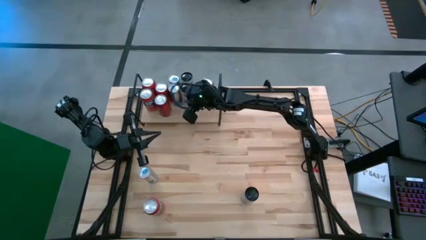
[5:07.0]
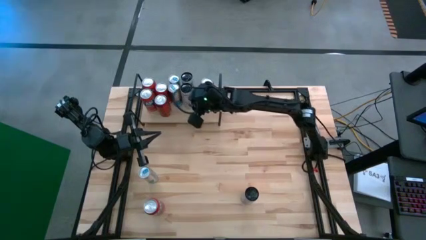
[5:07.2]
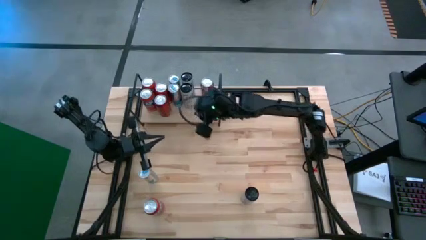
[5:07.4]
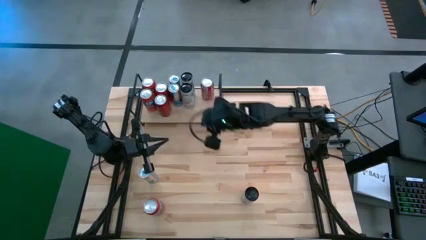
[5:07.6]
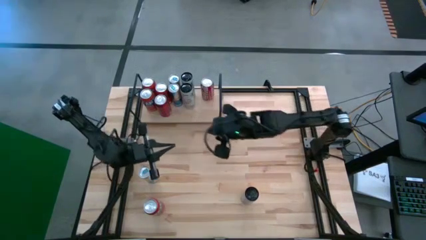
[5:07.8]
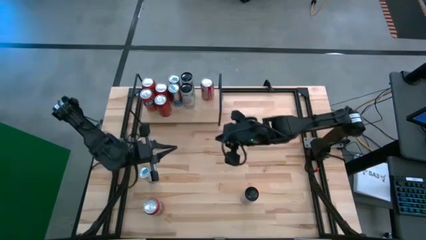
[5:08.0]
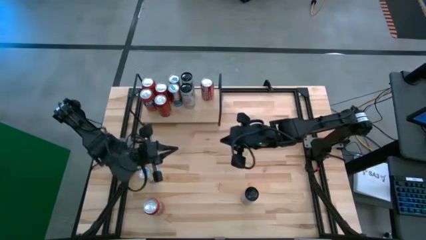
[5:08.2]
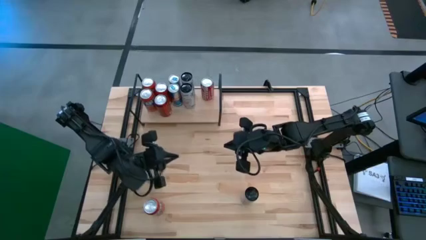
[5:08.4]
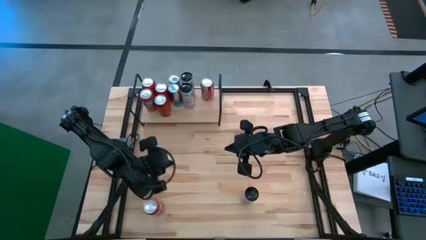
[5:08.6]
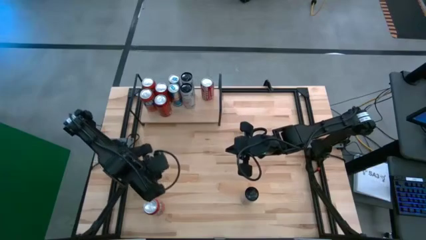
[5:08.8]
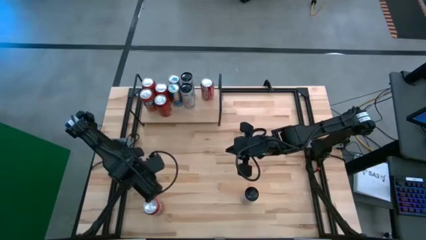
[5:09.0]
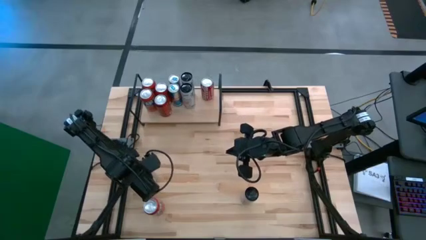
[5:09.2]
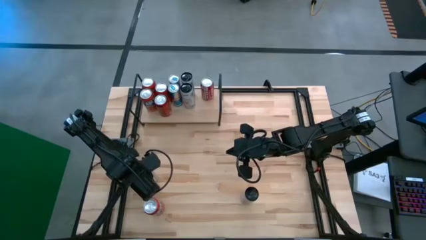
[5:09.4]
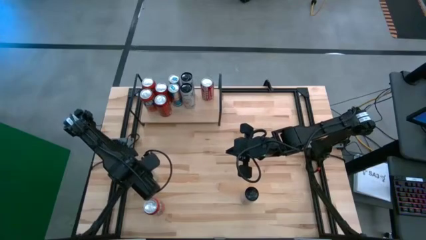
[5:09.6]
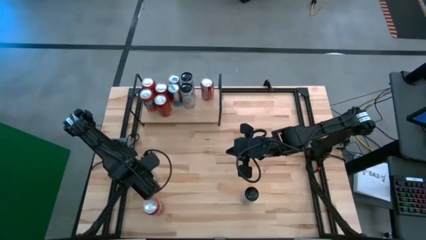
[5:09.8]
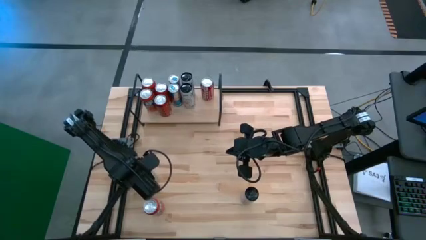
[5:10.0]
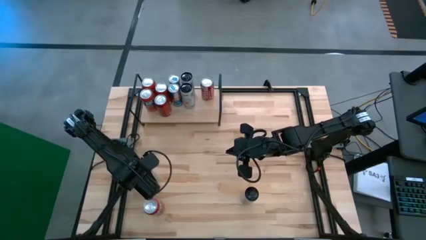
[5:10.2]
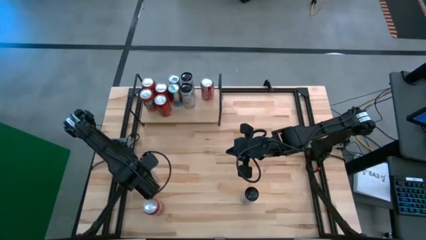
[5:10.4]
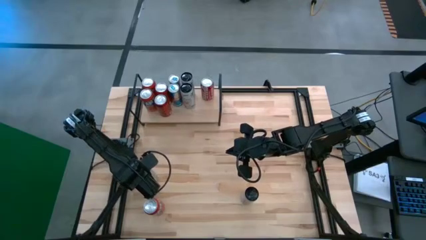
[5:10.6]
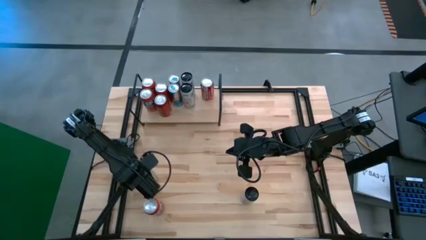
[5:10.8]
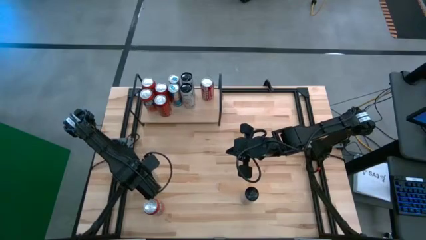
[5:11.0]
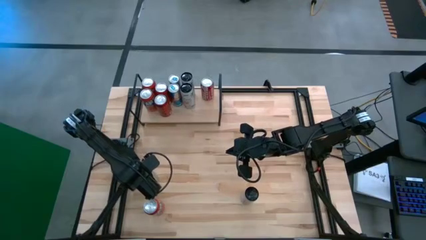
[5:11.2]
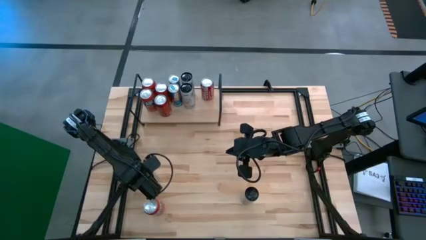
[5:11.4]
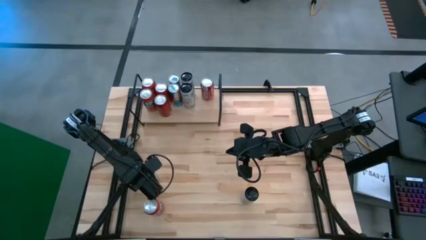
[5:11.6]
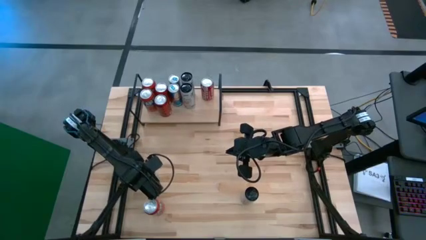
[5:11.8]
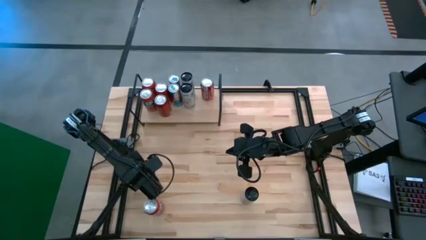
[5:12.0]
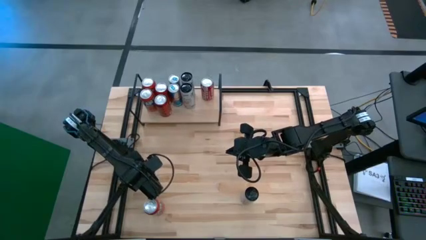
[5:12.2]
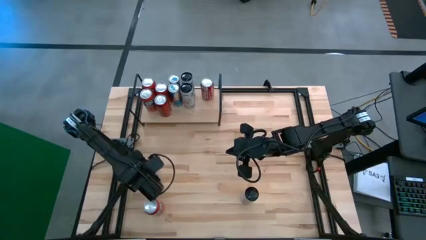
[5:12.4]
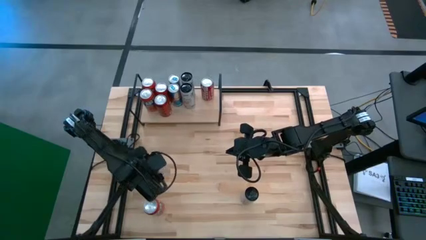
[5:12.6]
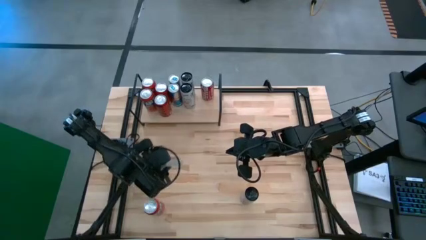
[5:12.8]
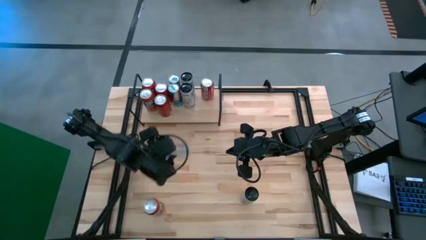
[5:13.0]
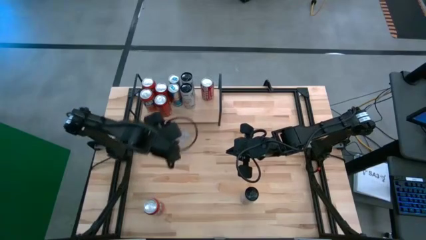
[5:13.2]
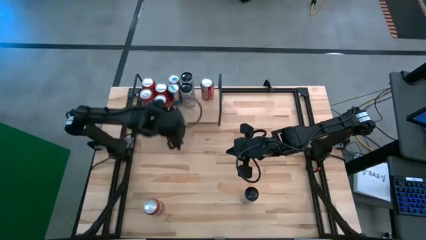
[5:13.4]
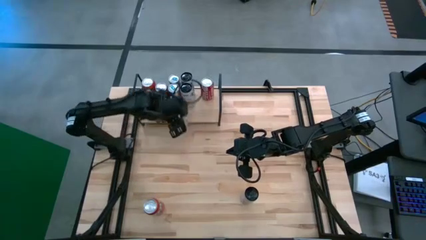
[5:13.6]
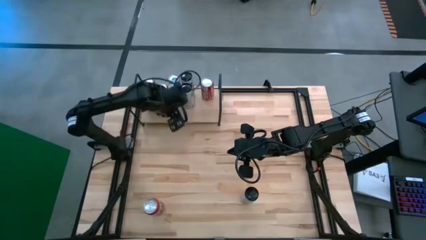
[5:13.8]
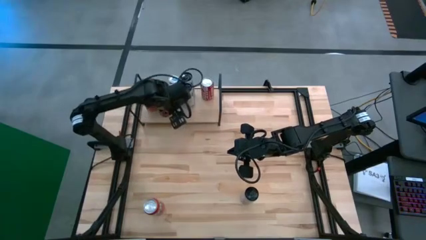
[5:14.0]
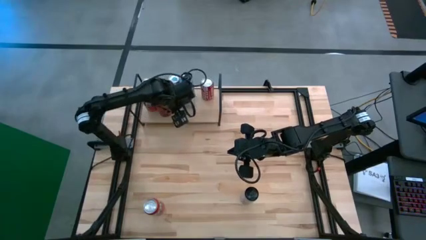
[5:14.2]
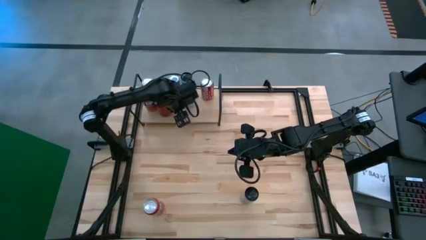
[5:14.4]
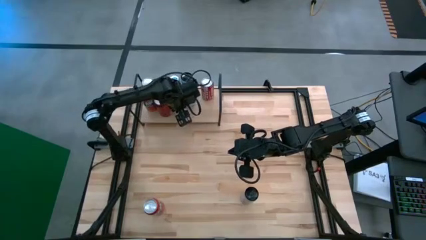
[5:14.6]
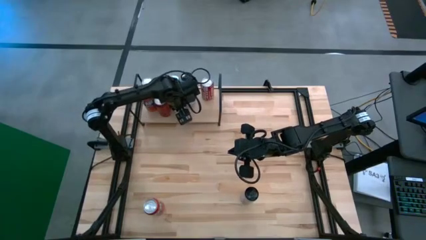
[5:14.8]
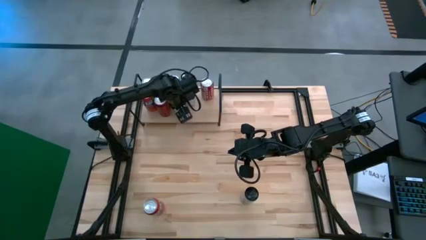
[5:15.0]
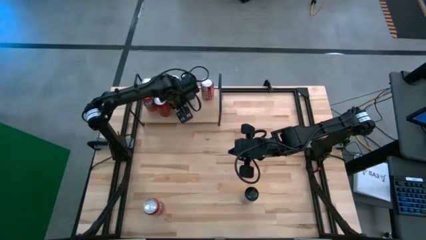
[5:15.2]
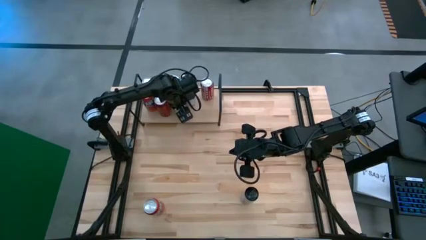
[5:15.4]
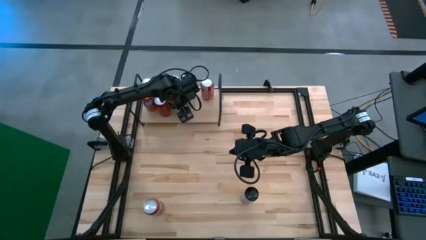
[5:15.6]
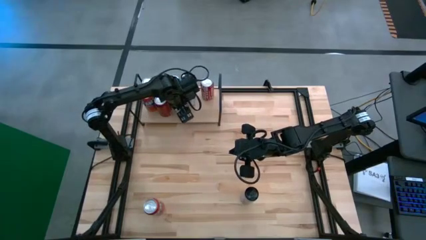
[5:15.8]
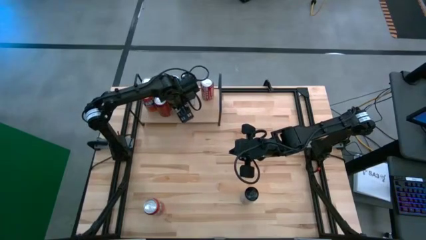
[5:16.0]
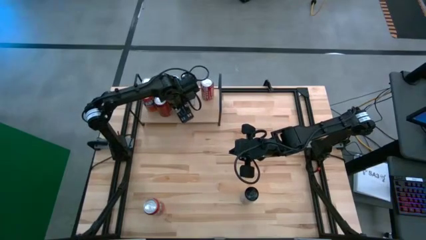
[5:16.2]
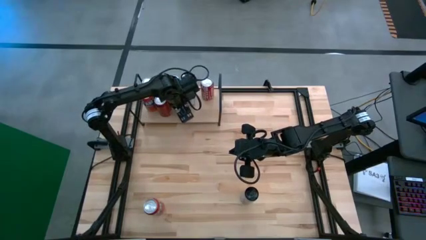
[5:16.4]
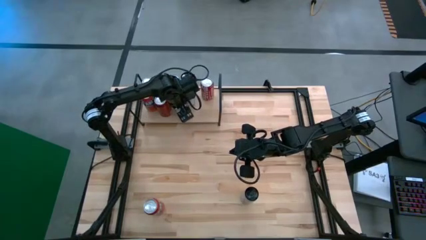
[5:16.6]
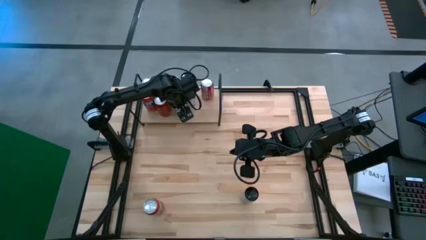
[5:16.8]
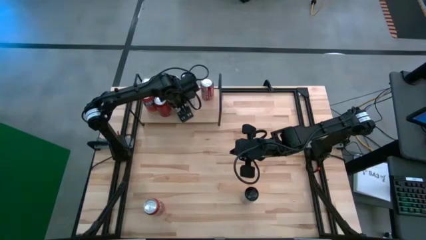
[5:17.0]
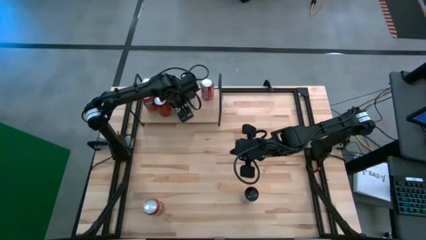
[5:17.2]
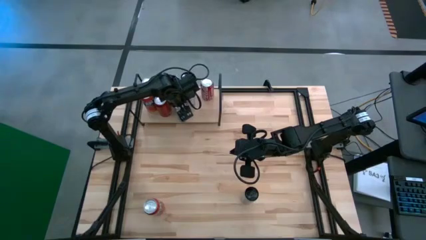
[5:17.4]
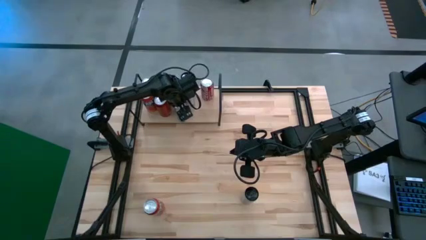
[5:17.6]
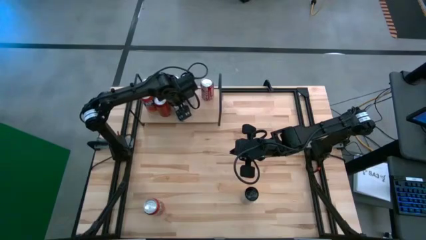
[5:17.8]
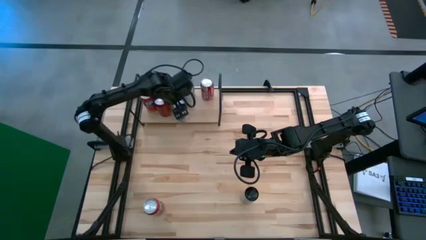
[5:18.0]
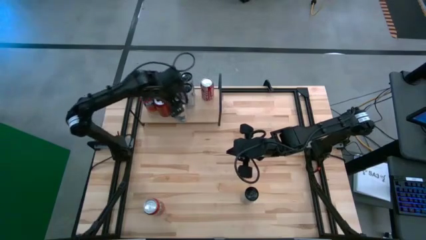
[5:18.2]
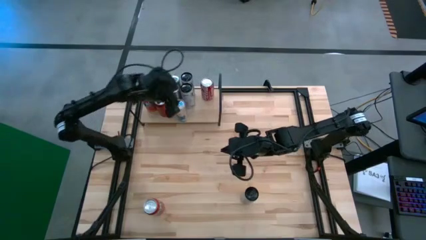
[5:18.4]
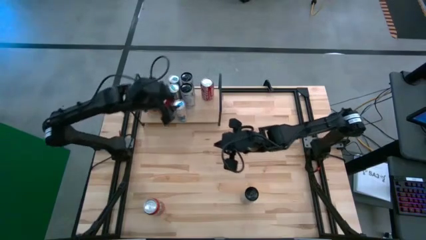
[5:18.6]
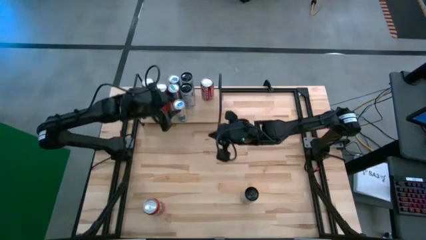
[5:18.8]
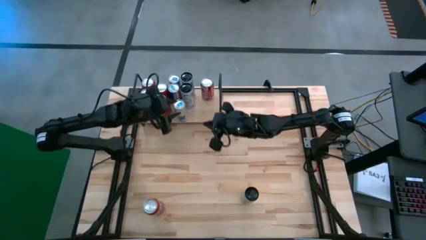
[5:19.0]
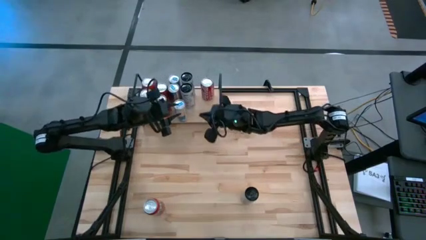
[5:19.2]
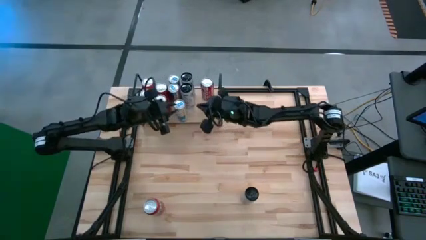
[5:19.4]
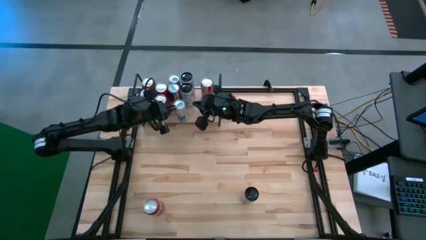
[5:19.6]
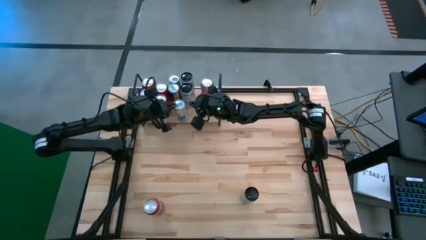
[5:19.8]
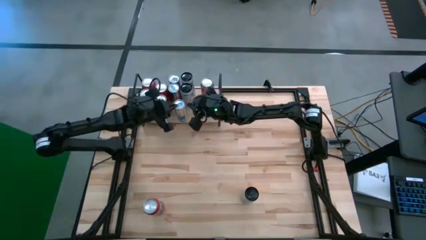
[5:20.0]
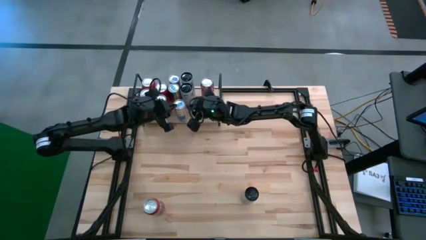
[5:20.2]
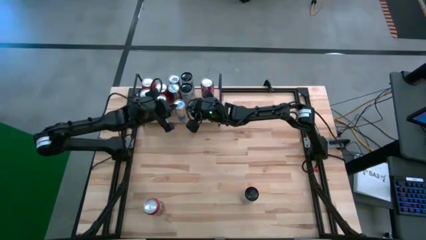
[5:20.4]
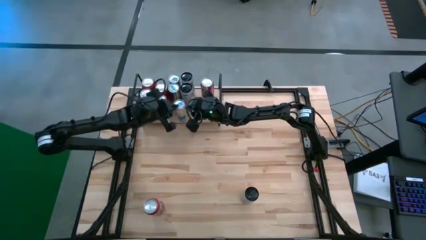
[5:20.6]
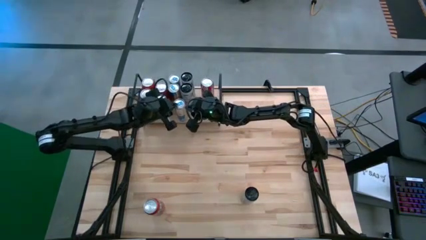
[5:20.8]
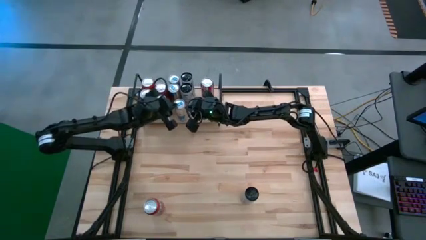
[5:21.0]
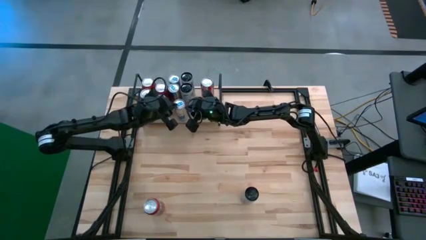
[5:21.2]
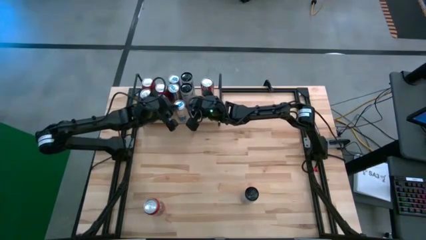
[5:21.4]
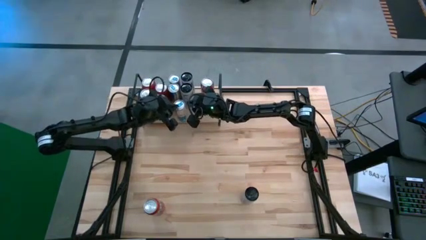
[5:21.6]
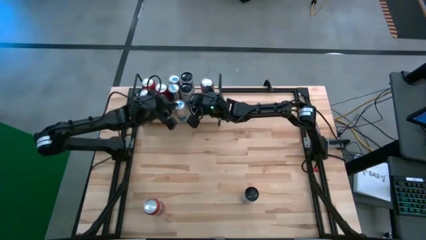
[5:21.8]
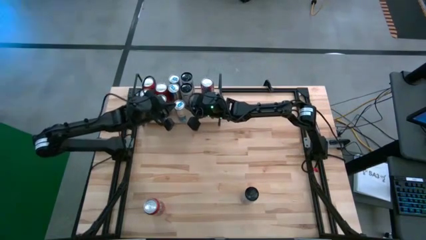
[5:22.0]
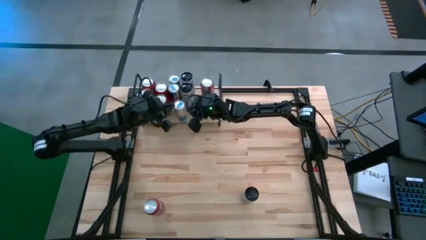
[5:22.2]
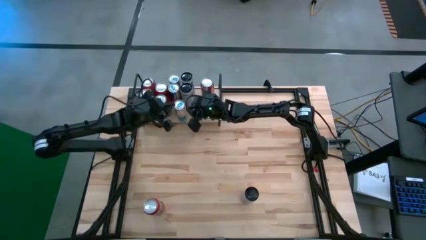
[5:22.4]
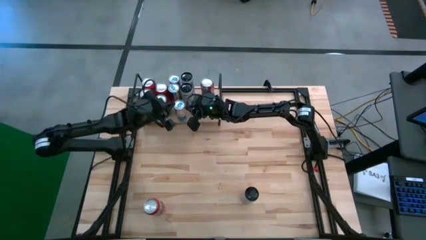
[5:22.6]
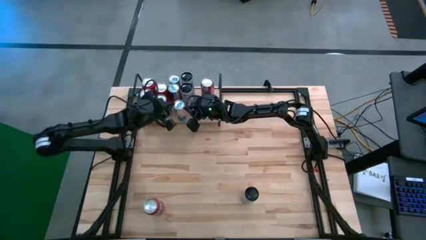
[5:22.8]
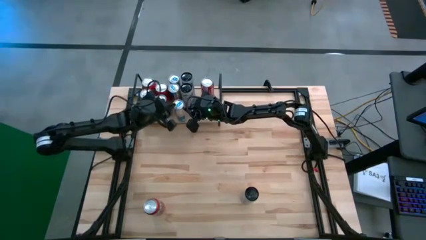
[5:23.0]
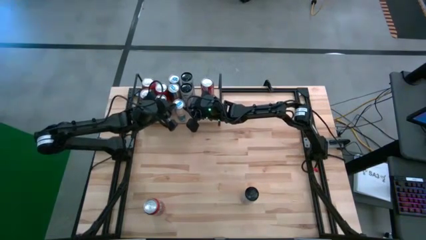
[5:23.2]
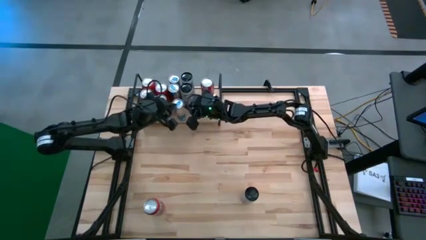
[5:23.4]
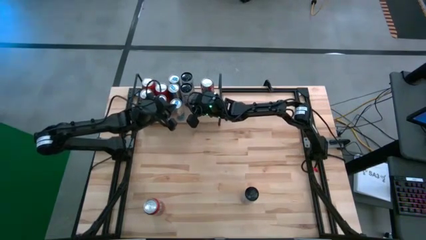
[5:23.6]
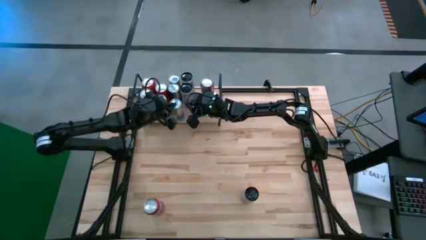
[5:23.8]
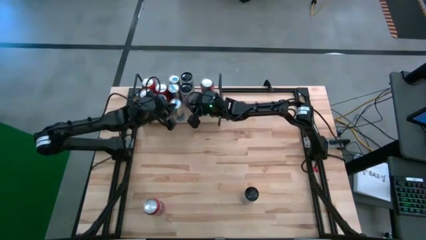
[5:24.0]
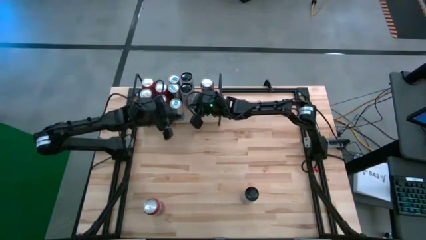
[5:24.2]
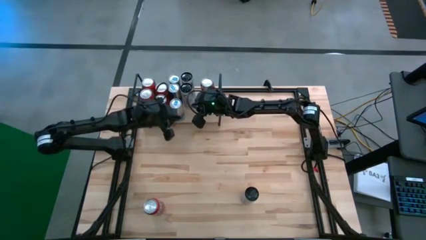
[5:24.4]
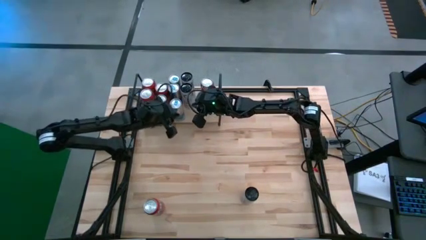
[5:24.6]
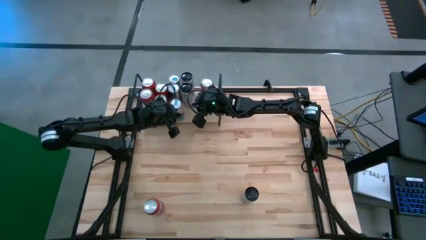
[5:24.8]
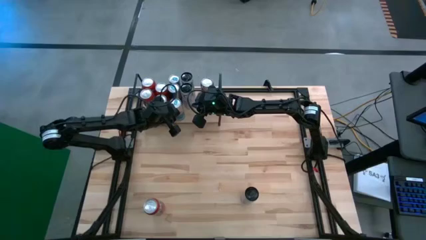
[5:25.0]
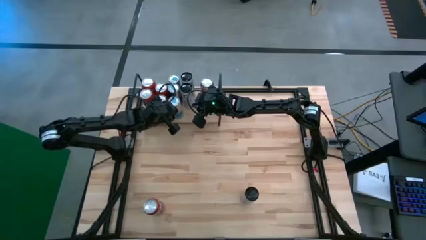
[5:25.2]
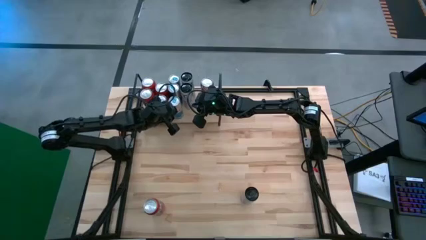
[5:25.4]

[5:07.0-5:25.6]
Task: Place canned beverage on shelf
Put the blue soda can on the shelf aligned with the other blue soda cans
